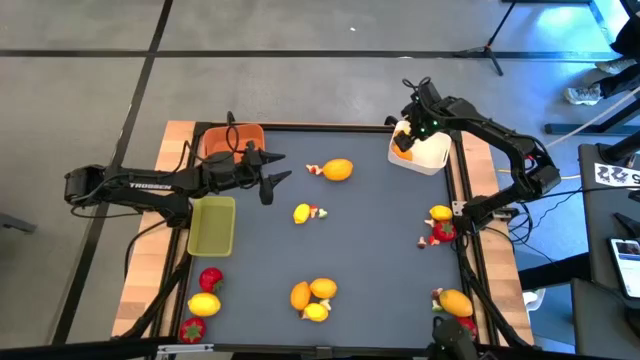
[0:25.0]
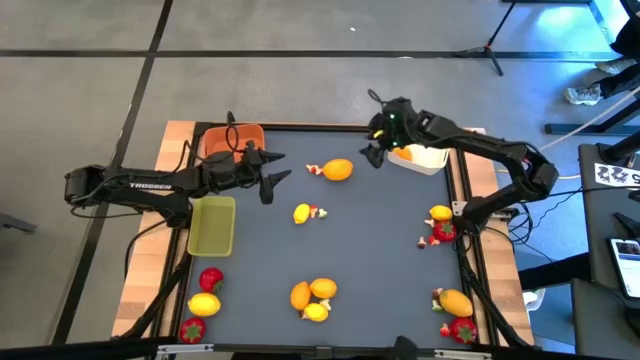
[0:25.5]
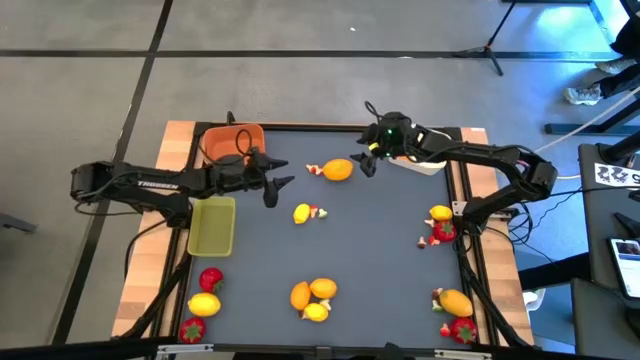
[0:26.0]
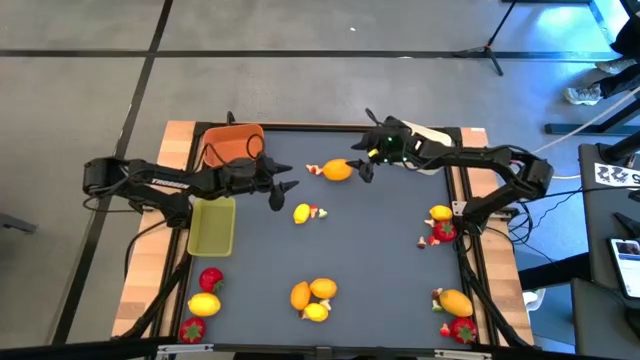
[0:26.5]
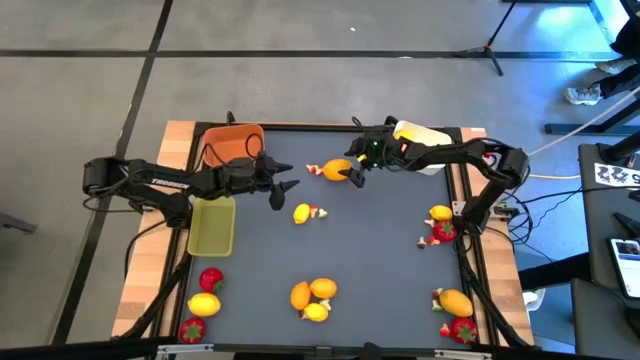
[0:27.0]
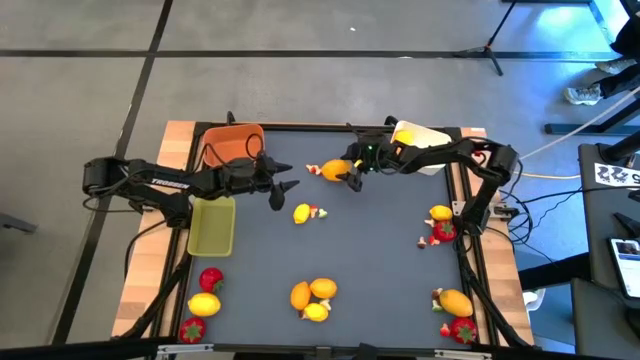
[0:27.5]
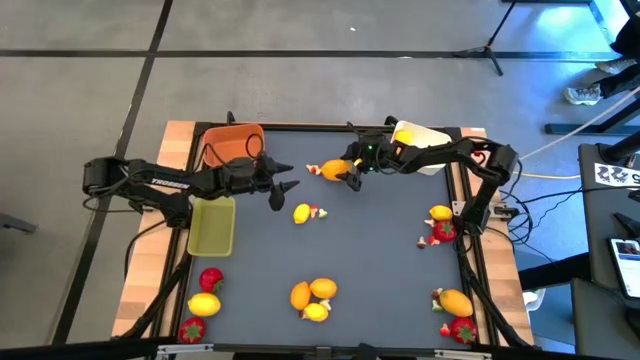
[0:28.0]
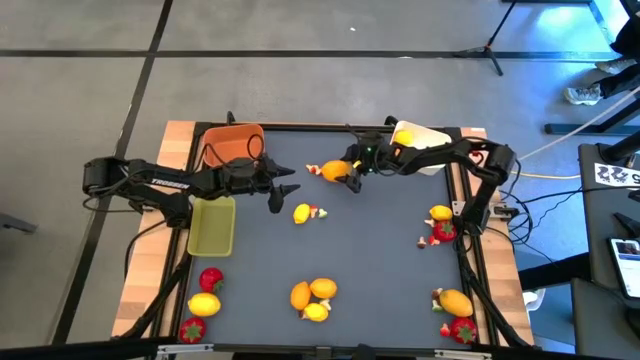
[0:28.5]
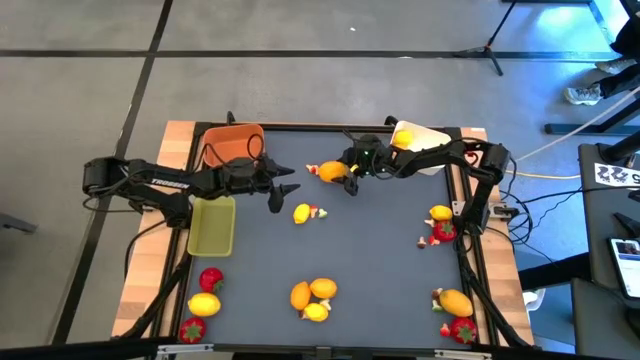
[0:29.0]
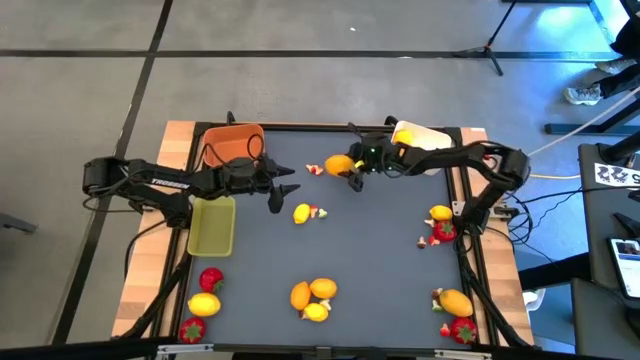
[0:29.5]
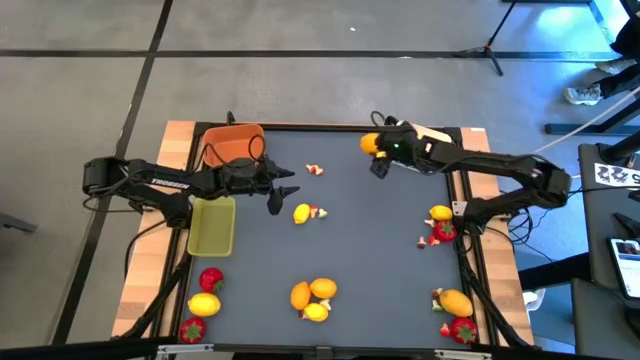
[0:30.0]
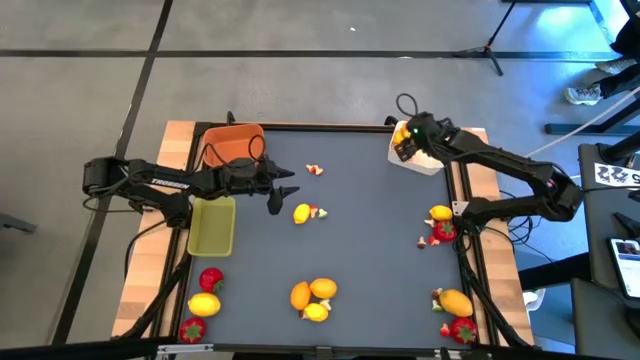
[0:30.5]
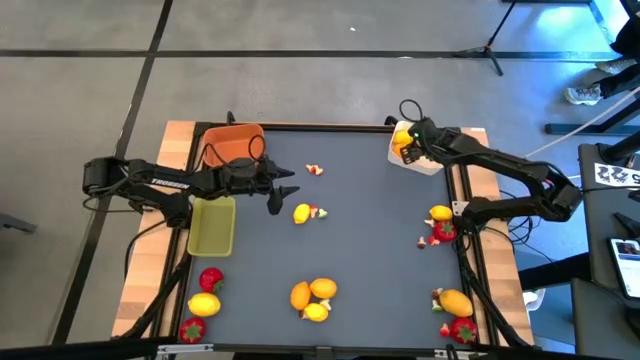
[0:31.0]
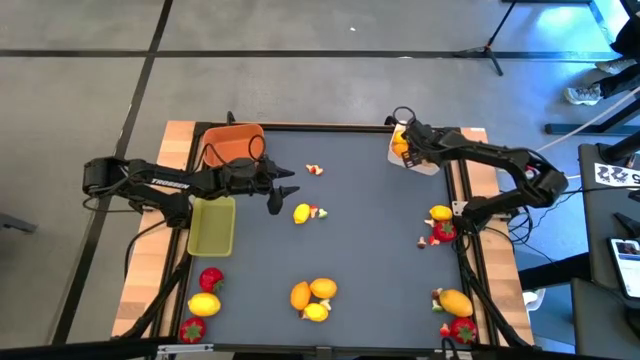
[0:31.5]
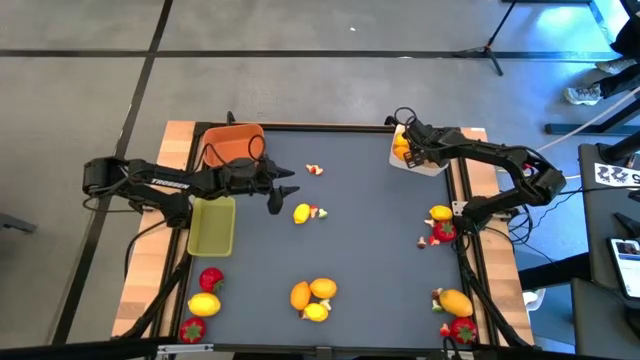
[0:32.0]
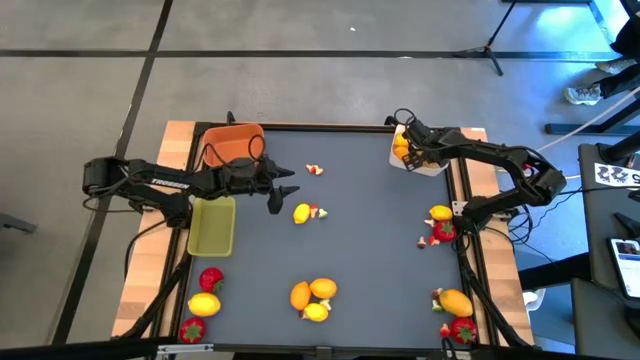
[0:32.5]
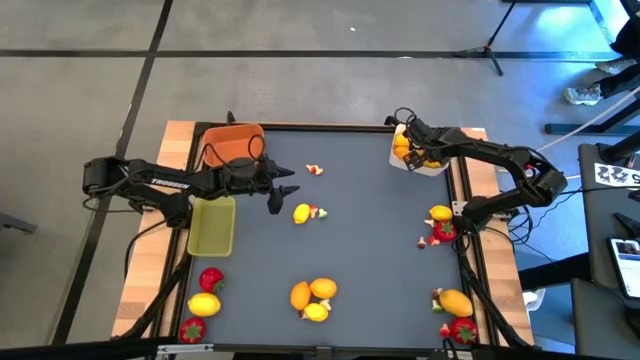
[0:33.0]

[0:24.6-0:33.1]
Task: Sort produce into baskets
Put the lemon into the white bin

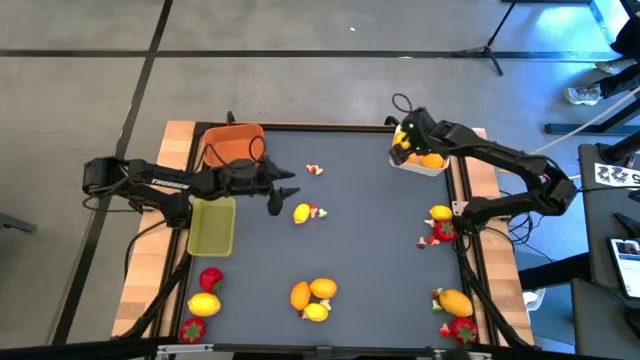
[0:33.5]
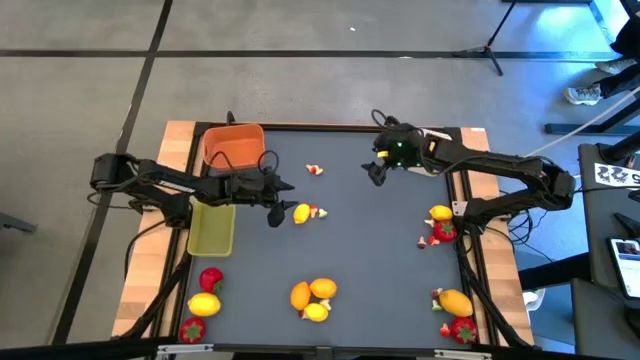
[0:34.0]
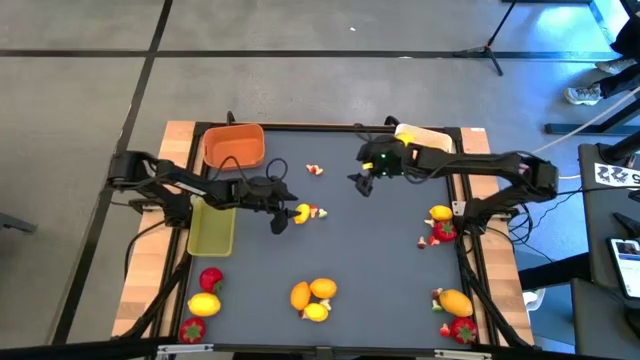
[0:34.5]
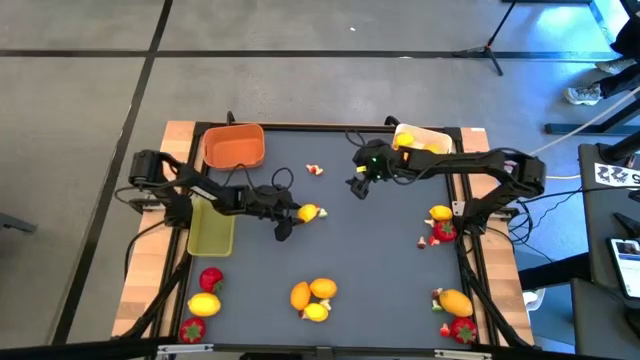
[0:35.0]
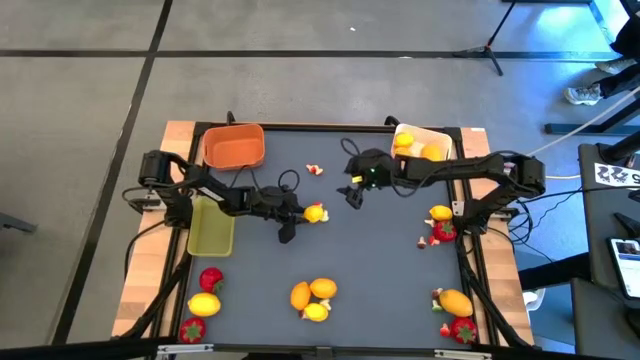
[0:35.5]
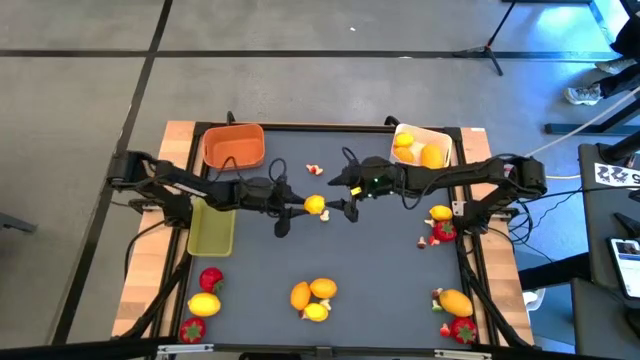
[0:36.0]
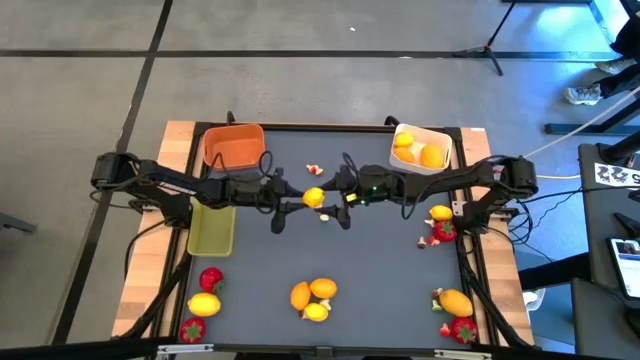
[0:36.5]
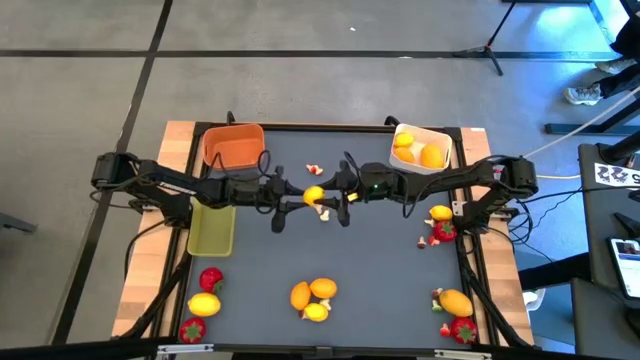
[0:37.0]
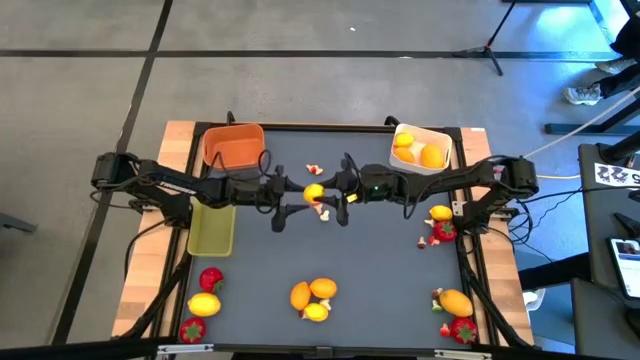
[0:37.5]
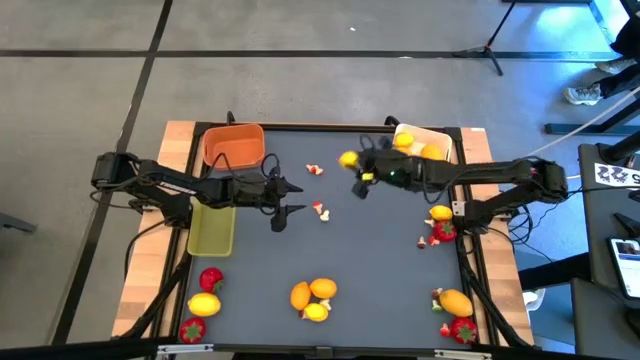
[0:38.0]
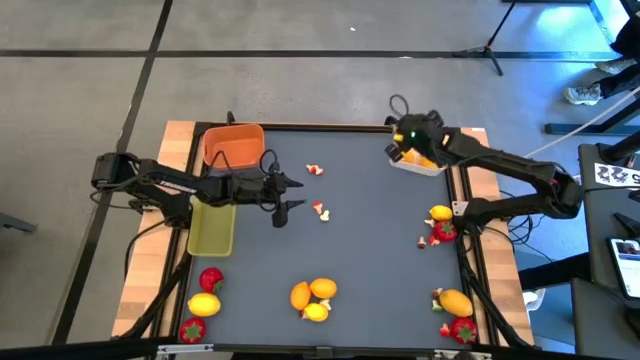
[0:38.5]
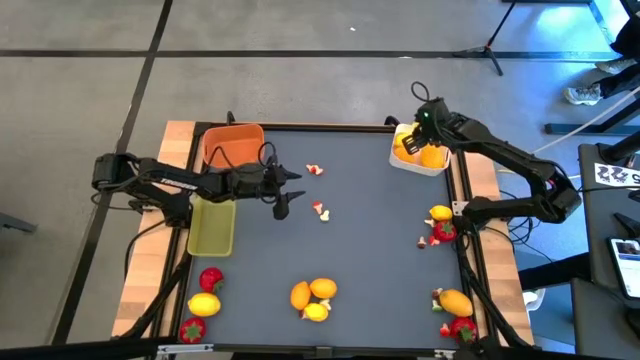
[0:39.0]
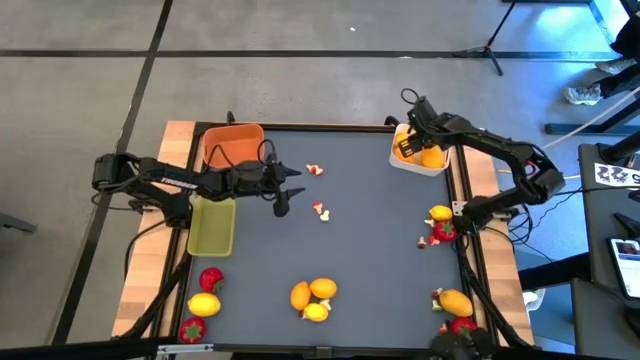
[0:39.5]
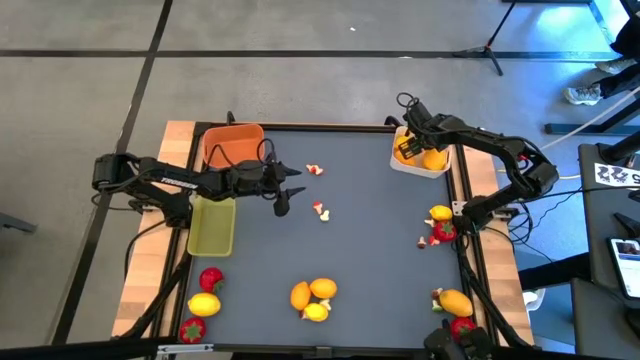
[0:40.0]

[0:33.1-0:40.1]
Put the lemon into the white bin

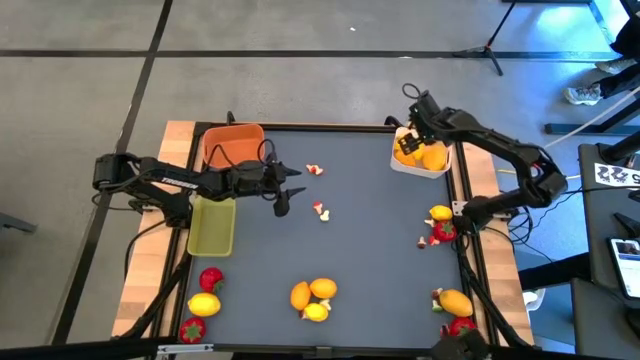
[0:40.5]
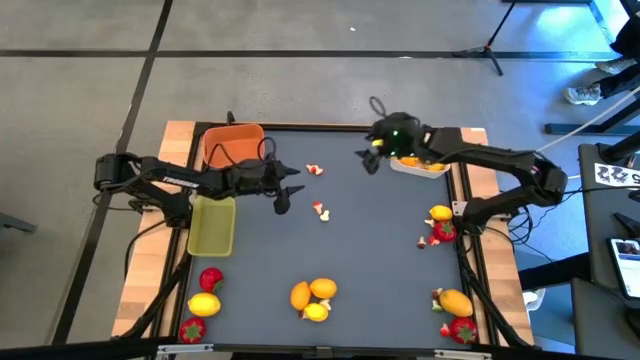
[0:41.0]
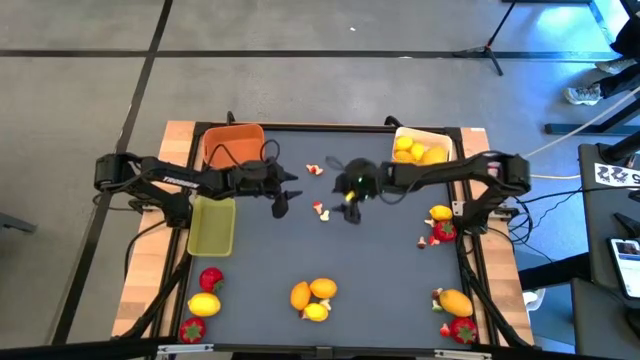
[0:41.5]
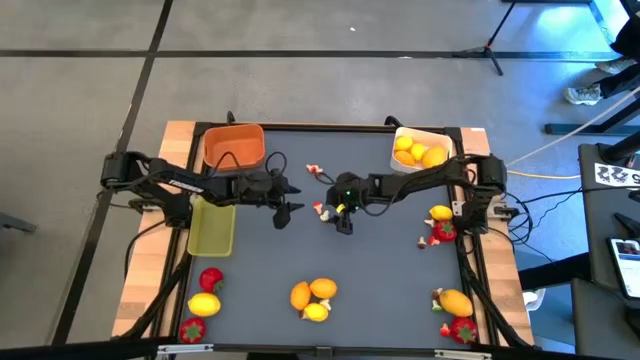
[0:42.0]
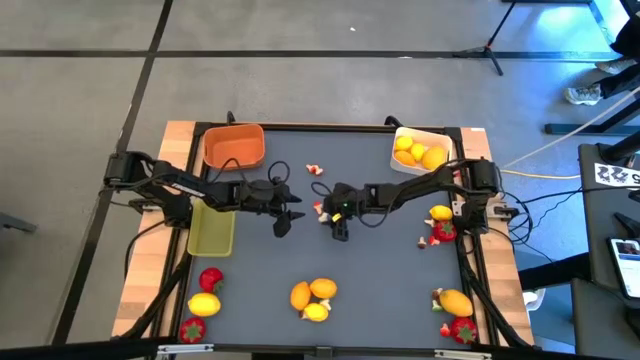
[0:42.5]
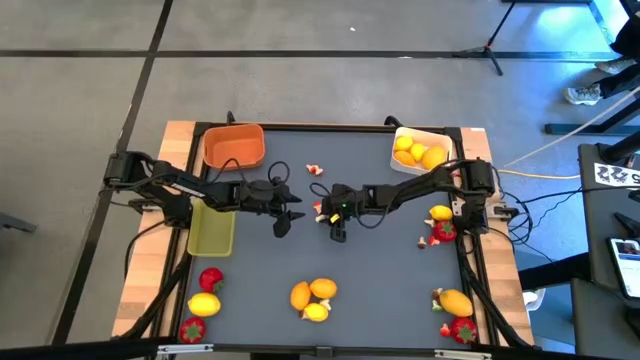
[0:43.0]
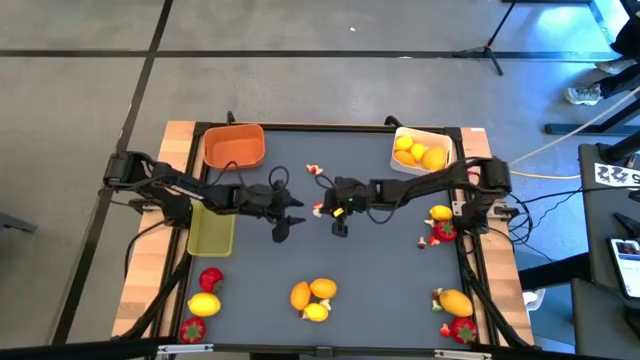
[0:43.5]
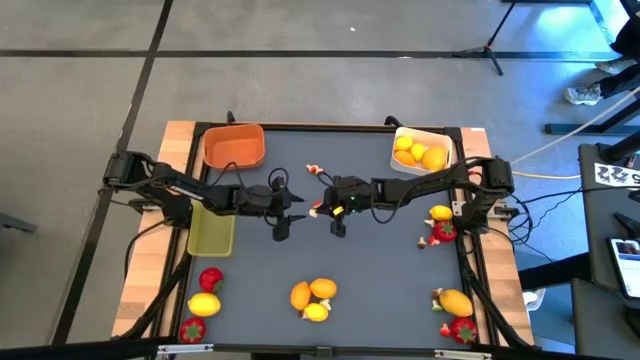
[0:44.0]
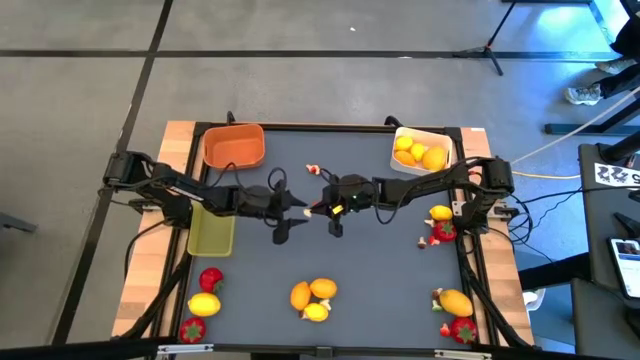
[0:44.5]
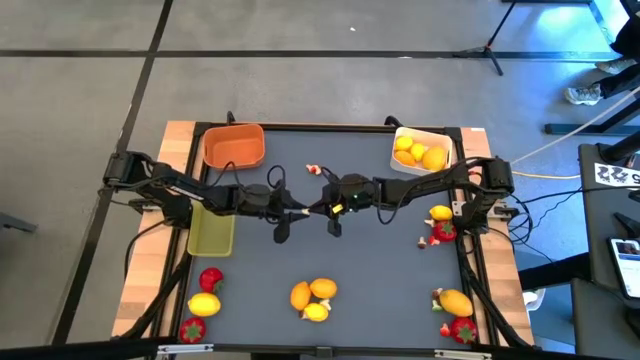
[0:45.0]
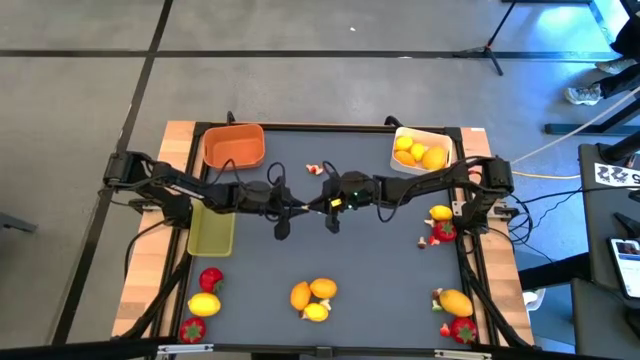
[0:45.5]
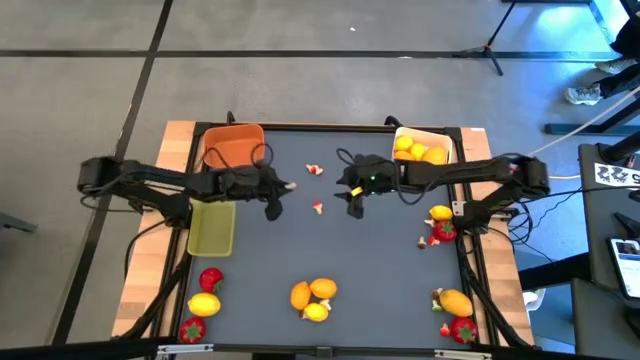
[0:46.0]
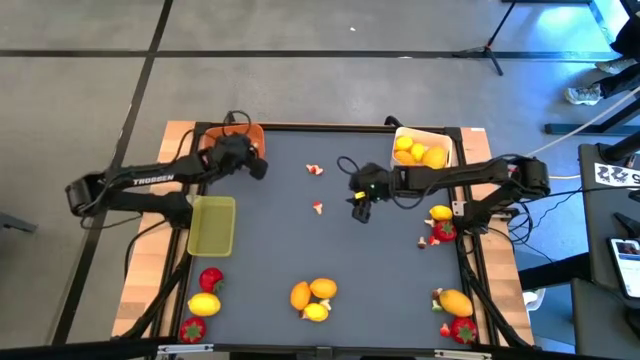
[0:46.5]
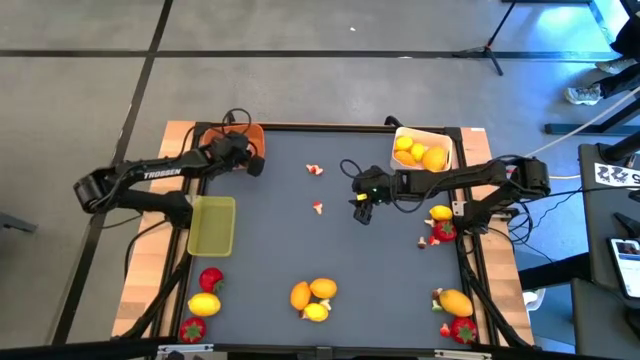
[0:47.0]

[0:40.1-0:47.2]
Put the green mushroom into the orange bin
